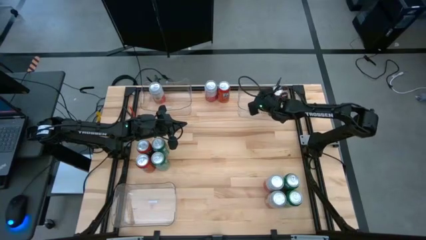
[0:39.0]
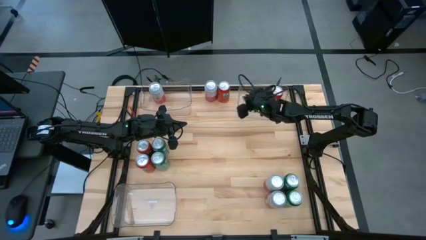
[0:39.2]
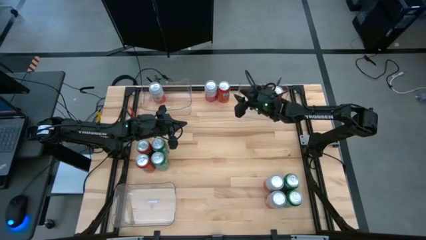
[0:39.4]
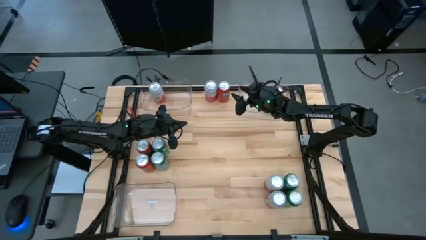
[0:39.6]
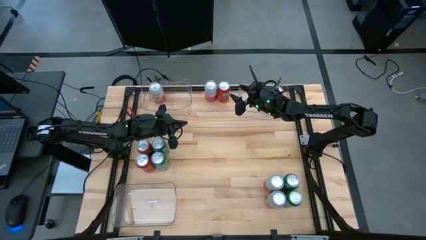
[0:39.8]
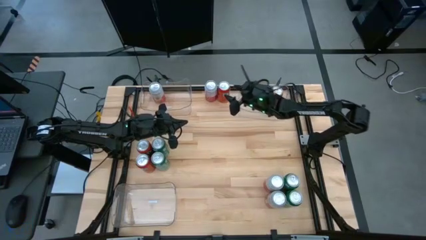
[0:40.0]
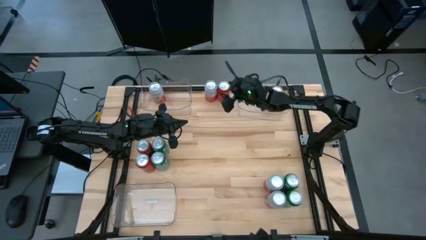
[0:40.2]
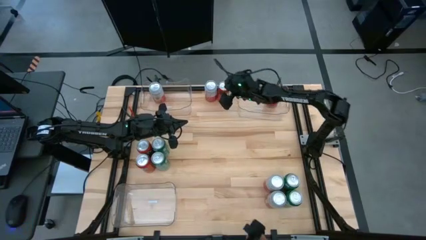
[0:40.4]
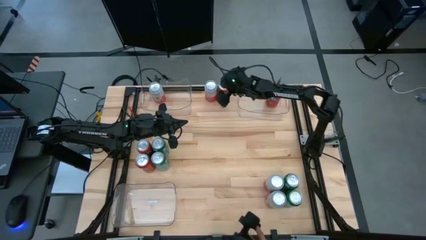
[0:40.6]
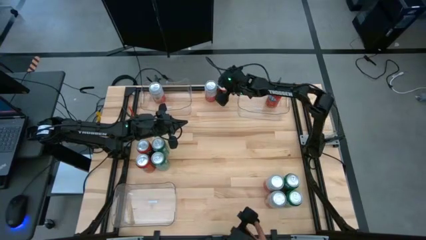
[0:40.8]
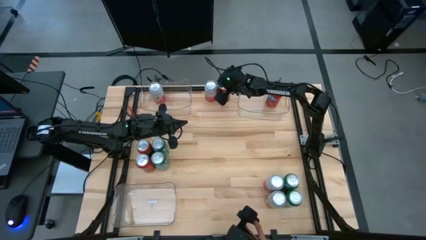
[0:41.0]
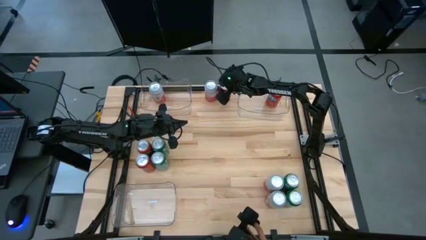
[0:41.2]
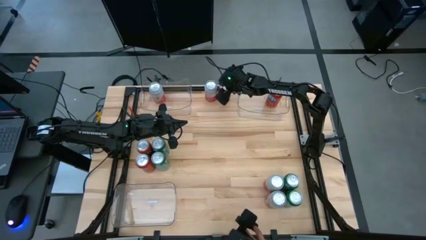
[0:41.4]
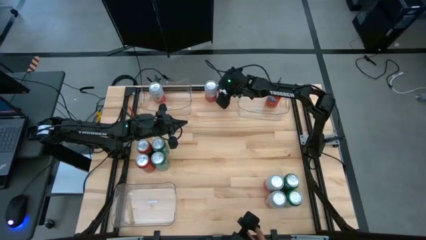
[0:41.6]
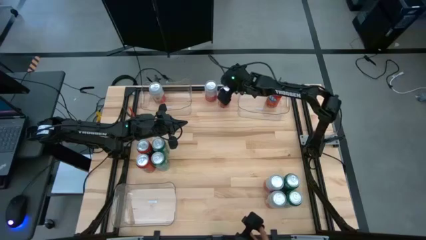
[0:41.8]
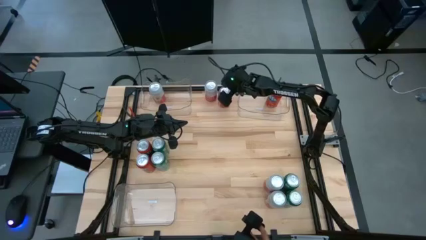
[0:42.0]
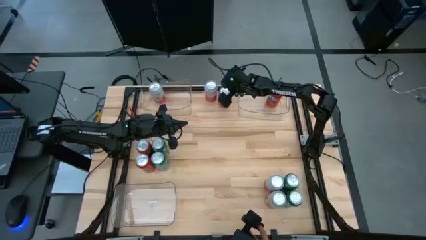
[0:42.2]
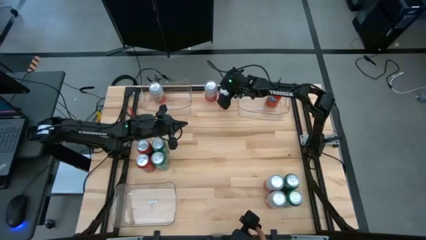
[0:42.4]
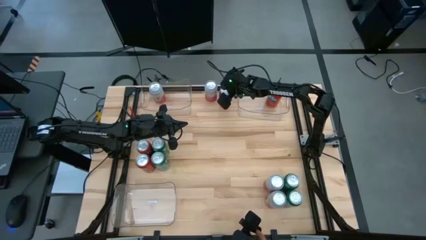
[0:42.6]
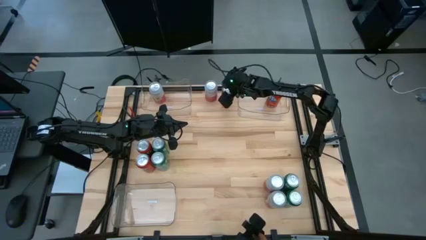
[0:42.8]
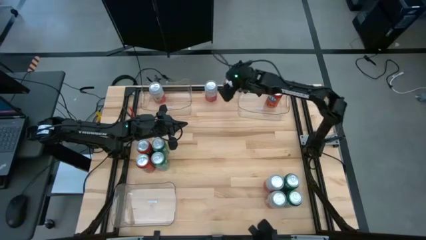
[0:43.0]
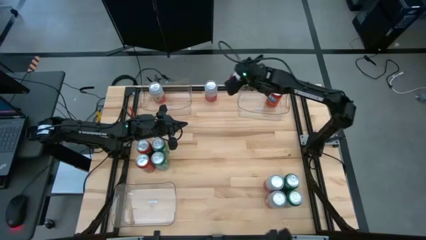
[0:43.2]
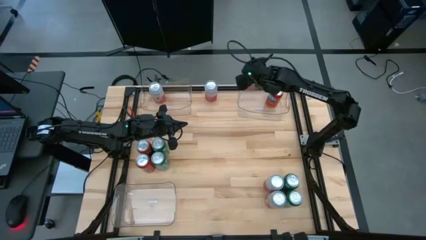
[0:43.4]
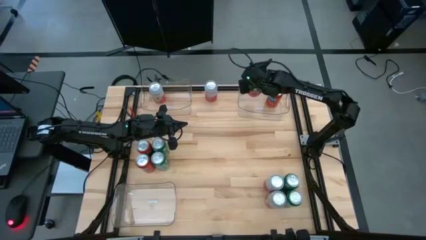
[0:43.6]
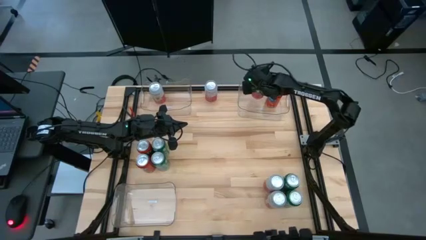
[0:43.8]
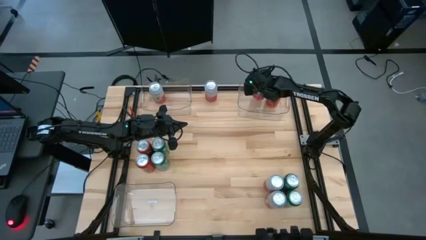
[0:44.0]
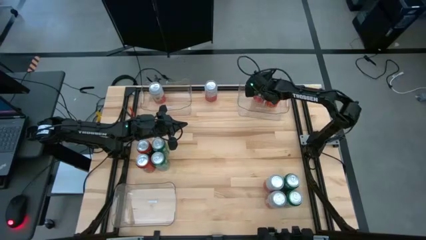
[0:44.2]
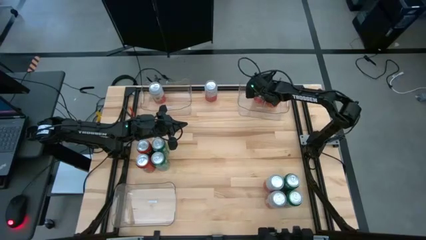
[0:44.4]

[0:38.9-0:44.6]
Task: Sort soda cans
Put the red soda can into the top right transparent bin

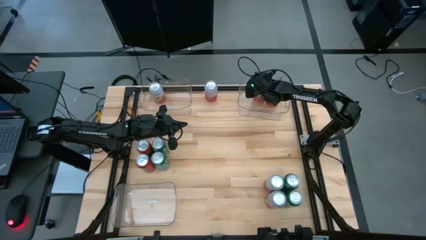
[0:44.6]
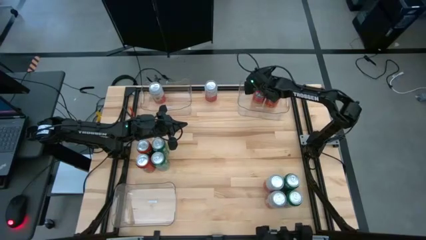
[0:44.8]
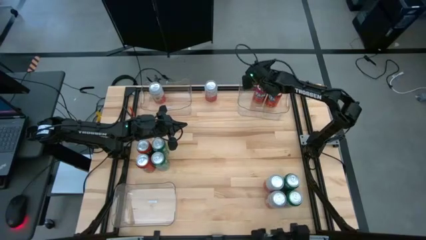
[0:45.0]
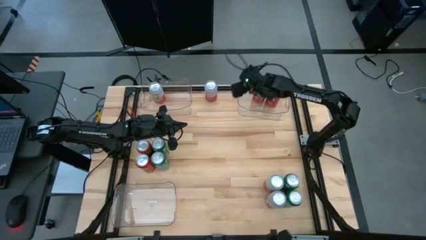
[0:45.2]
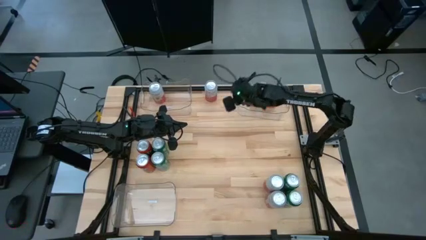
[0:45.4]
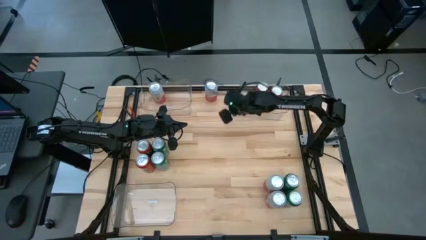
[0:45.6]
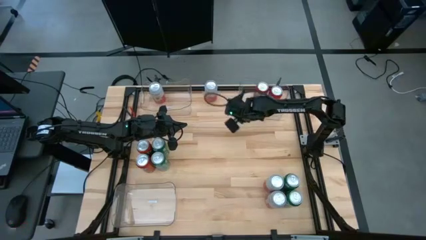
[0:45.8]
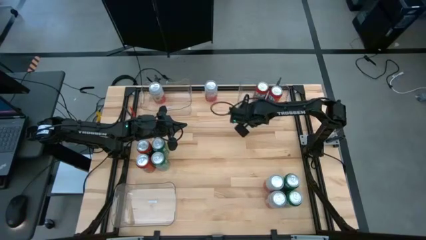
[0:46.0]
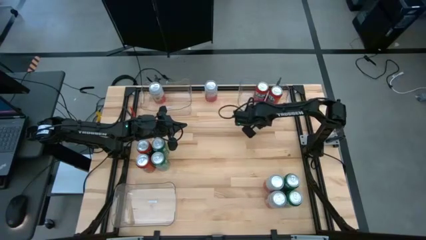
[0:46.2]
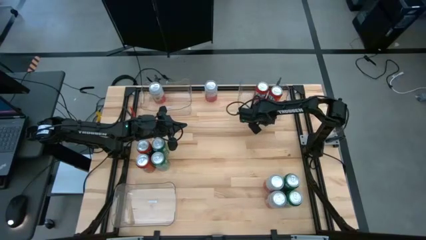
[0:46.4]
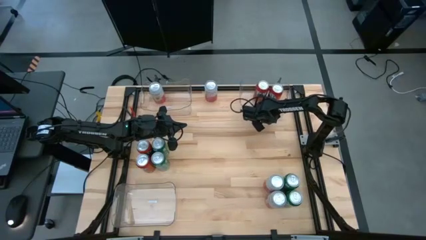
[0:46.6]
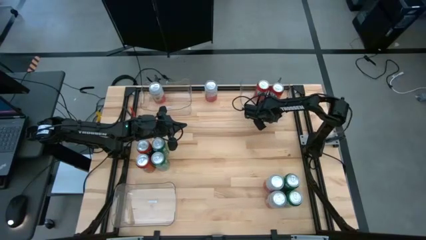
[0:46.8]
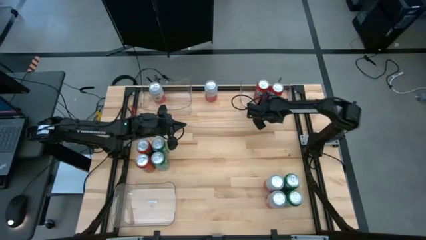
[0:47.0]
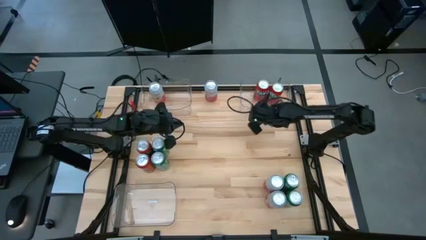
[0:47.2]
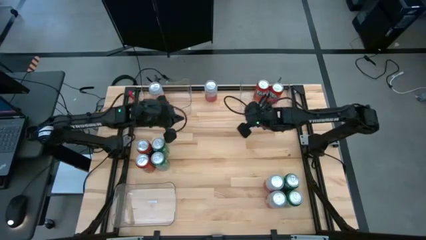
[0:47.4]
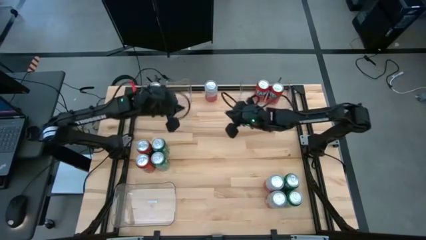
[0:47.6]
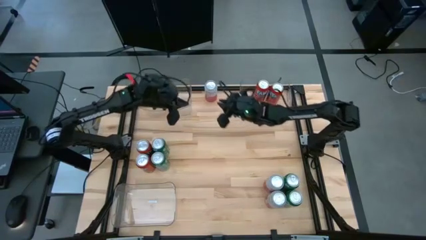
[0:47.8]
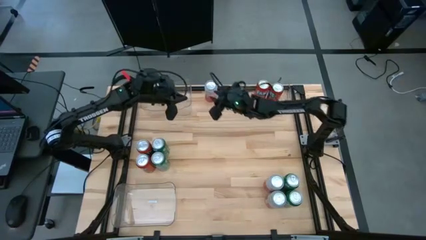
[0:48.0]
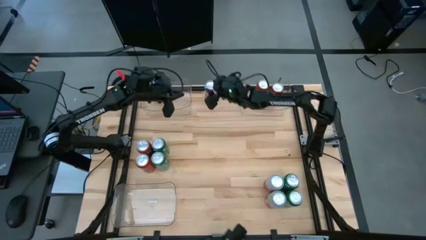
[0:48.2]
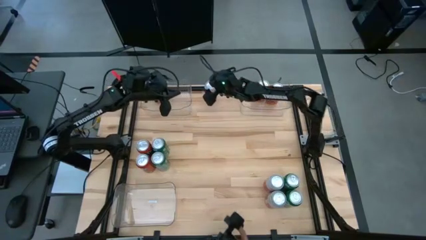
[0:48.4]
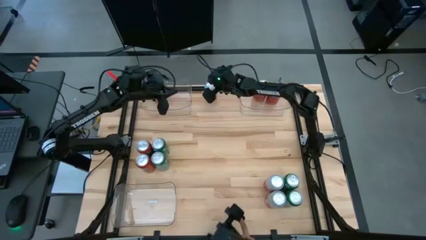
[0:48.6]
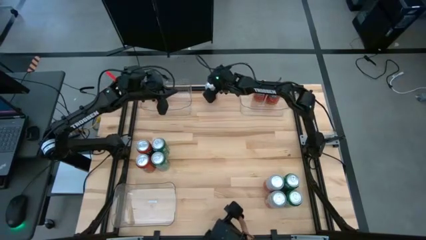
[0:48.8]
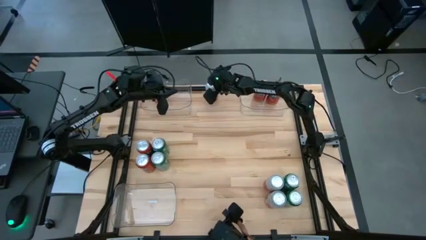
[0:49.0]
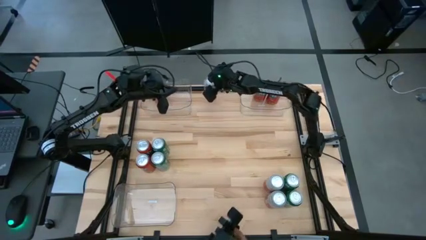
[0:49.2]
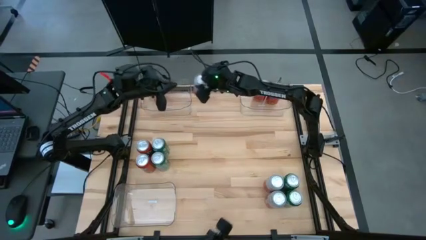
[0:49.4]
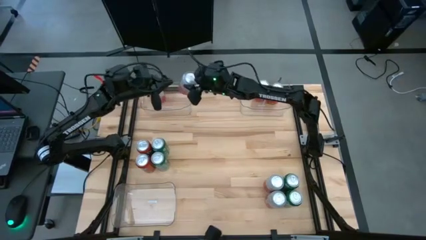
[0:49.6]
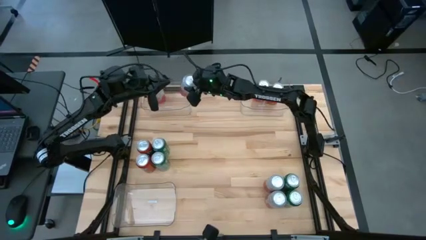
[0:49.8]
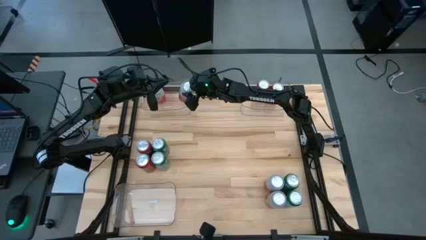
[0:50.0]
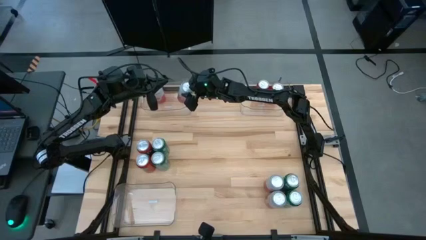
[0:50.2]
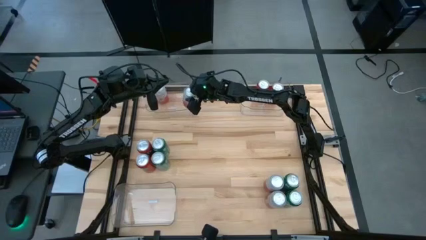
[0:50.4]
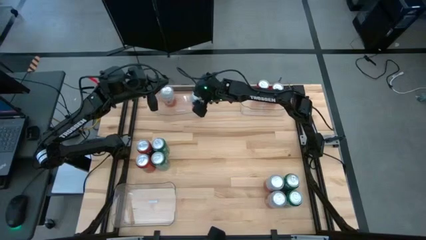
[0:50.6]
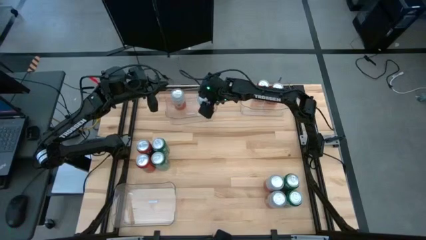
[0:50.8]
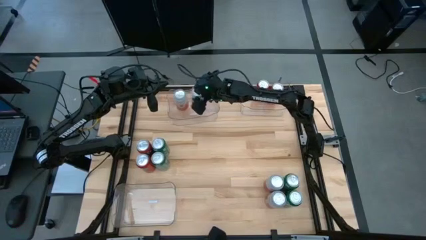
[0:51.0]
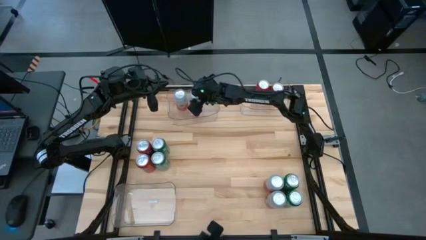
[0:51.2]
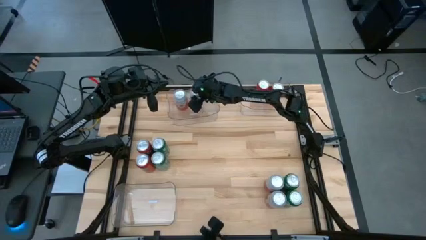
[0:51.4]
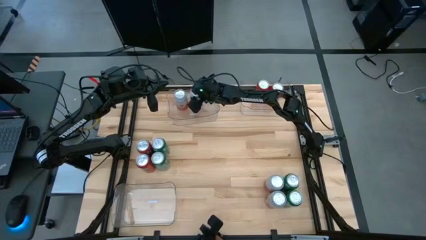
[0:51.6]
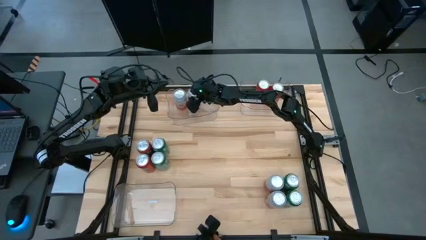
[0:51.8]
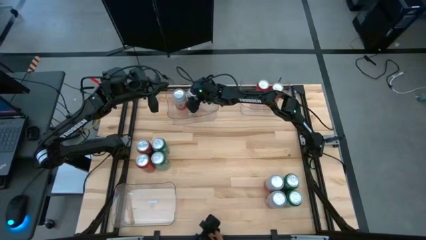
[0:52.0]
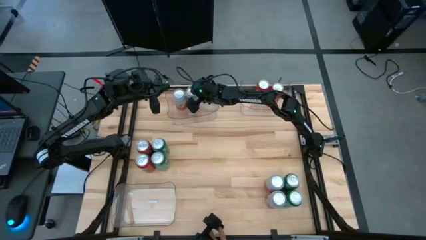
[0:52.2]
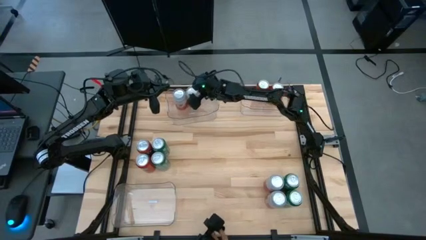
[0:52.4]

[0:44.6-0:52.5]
Put the pink-white soda can into the top left transparent bin

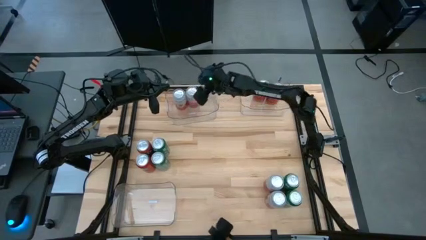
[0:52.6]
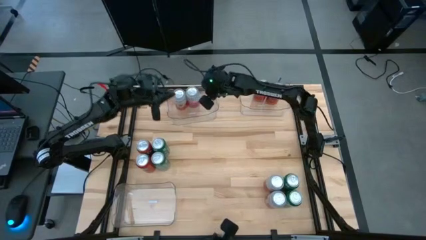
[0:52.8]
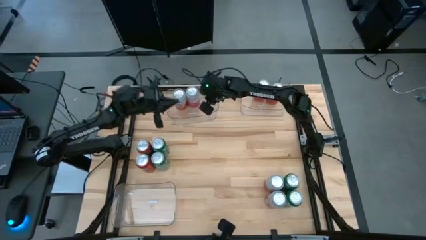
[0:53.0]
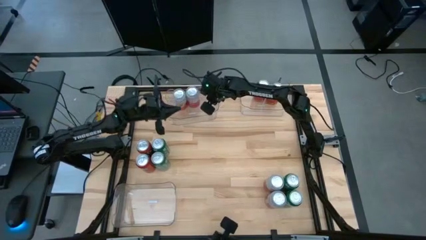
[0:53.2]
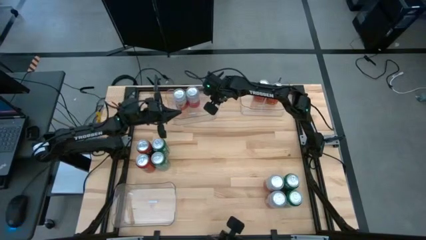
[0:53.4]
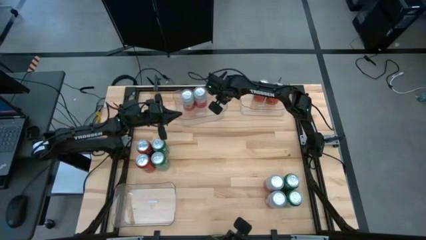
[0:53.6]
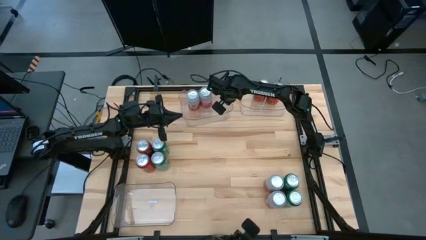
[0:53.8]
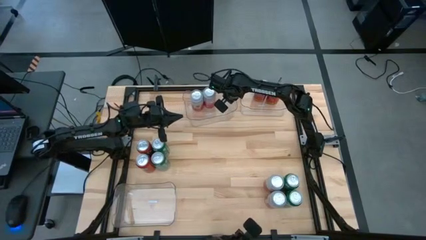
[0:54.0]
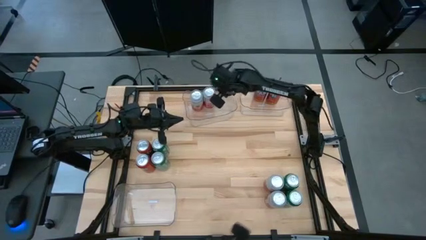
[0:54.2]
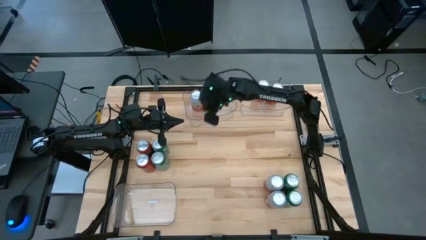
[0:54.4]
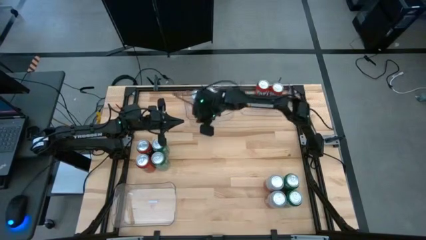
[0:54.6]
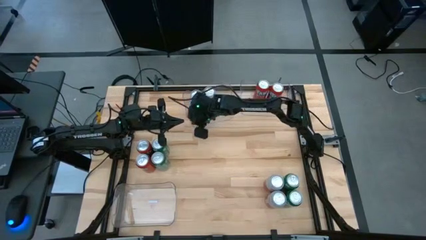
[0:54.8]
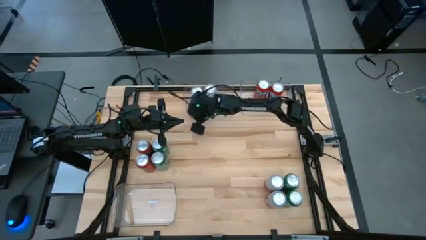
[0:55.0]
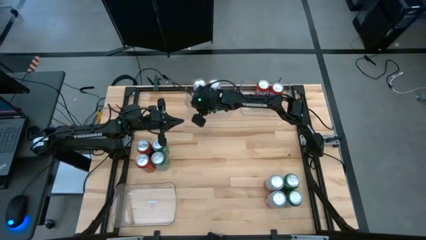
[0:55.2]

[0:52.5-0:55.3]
Adjust the top left transparent bin to the top center of the table
